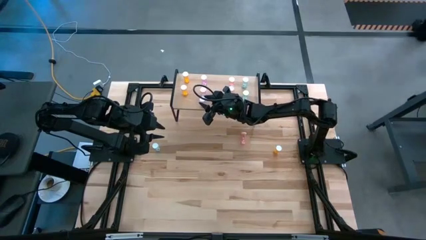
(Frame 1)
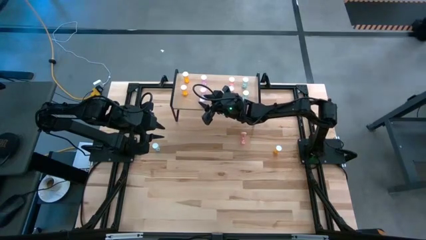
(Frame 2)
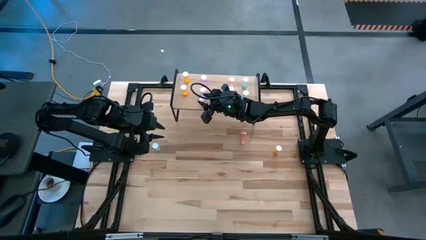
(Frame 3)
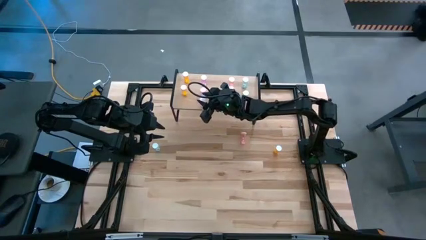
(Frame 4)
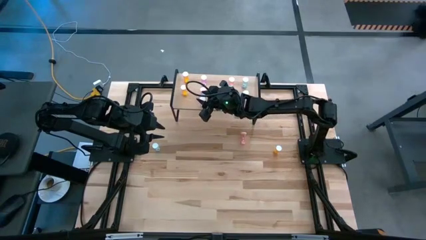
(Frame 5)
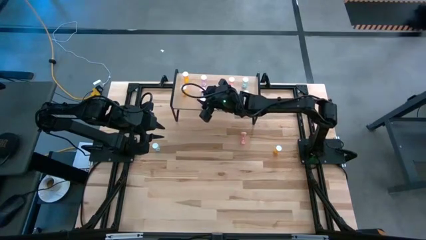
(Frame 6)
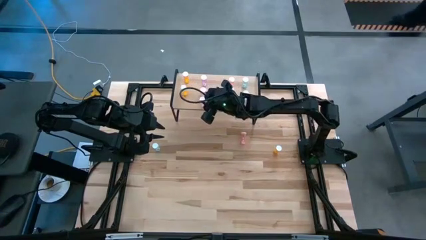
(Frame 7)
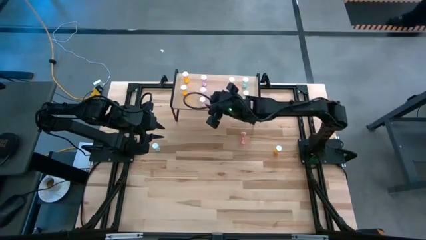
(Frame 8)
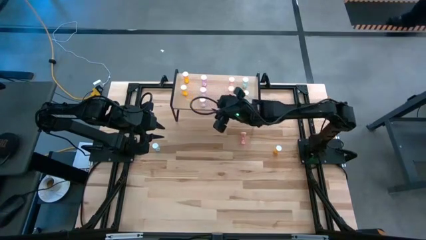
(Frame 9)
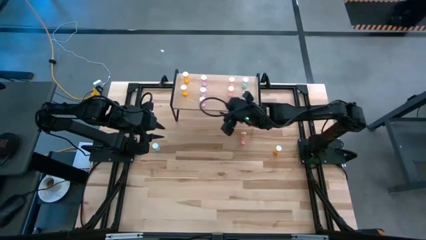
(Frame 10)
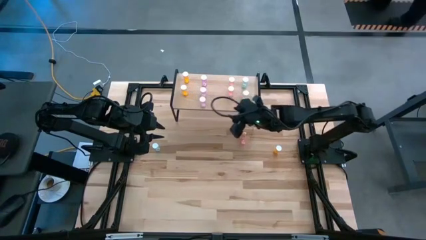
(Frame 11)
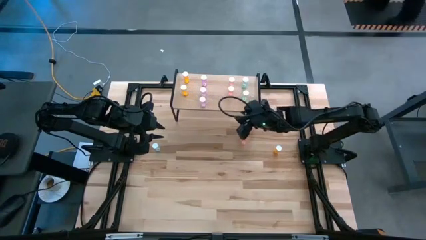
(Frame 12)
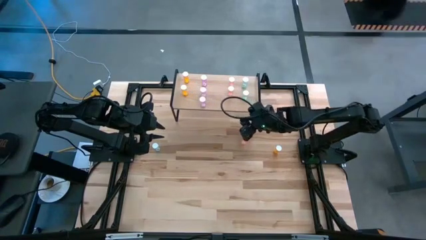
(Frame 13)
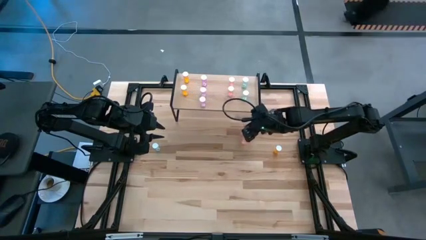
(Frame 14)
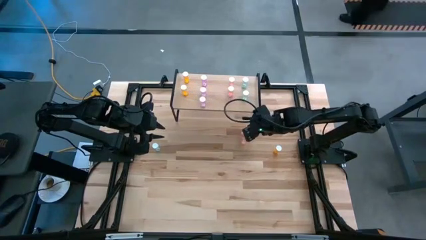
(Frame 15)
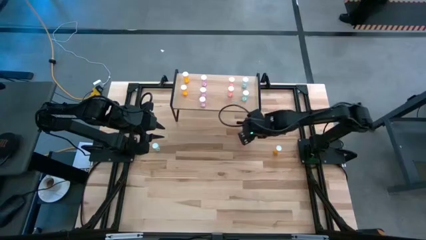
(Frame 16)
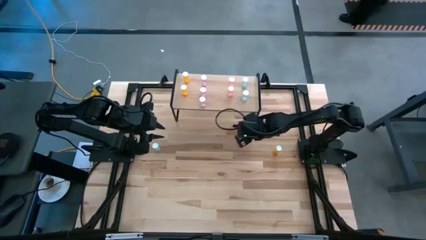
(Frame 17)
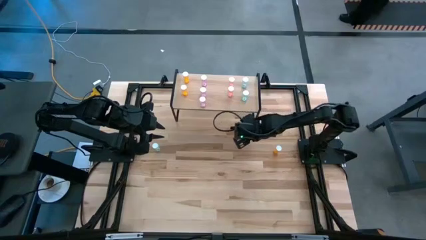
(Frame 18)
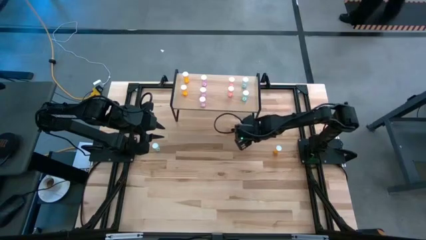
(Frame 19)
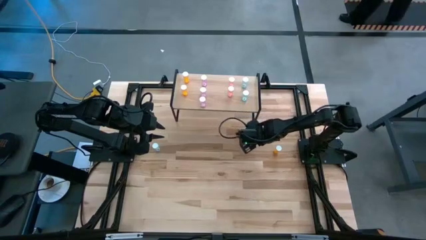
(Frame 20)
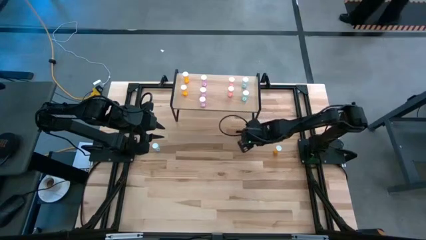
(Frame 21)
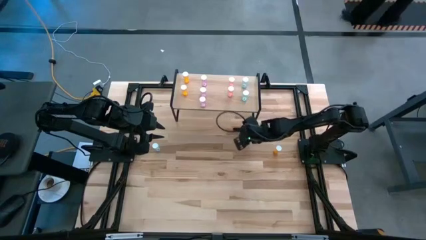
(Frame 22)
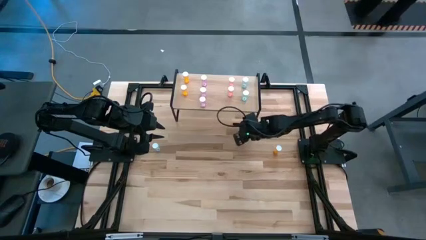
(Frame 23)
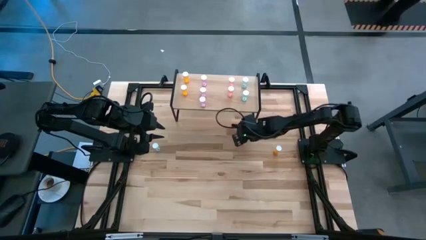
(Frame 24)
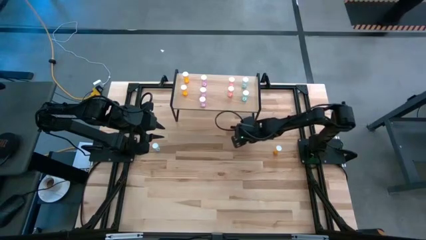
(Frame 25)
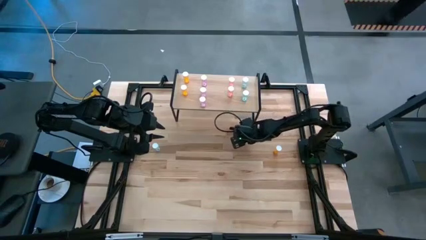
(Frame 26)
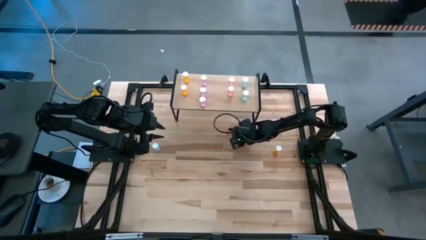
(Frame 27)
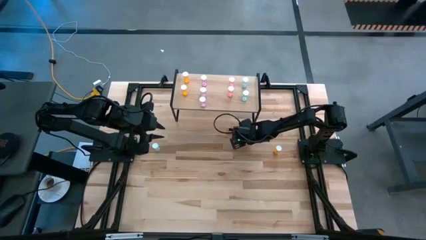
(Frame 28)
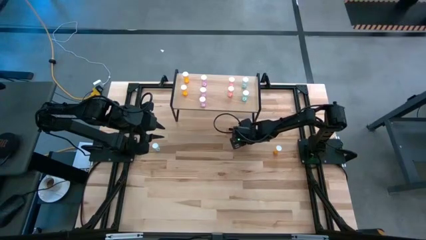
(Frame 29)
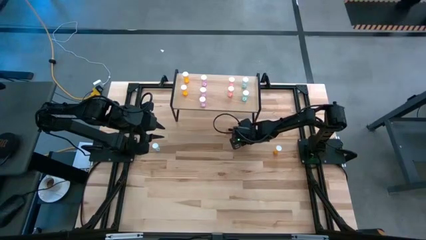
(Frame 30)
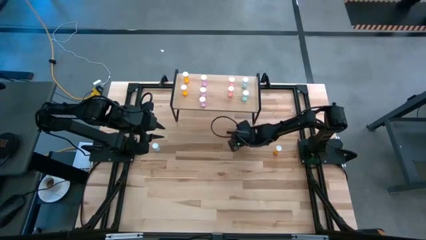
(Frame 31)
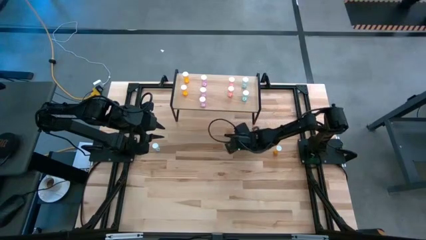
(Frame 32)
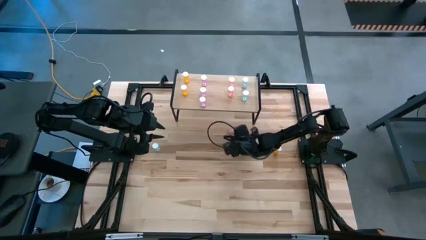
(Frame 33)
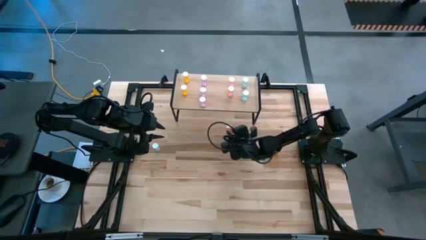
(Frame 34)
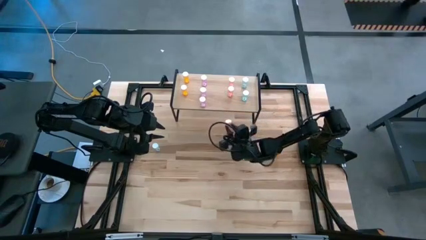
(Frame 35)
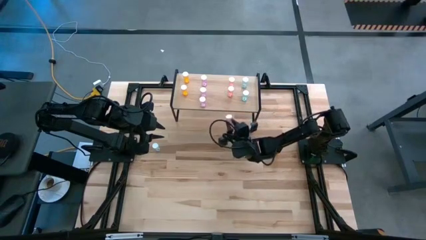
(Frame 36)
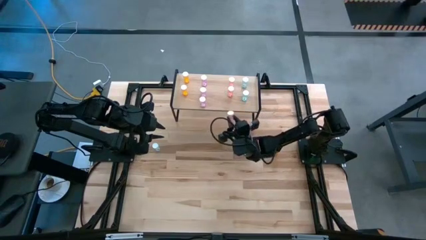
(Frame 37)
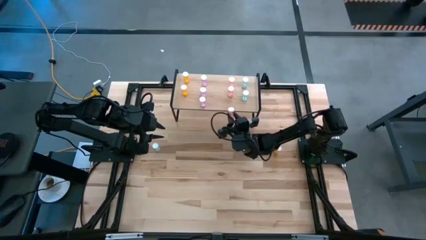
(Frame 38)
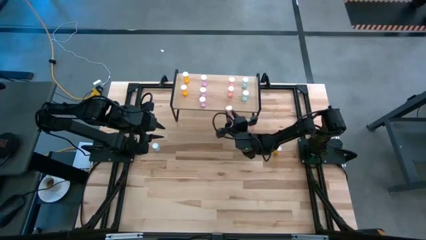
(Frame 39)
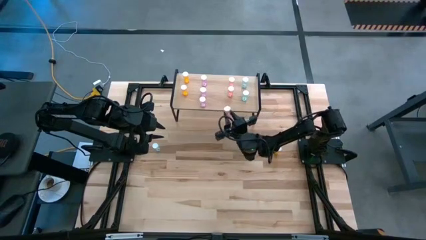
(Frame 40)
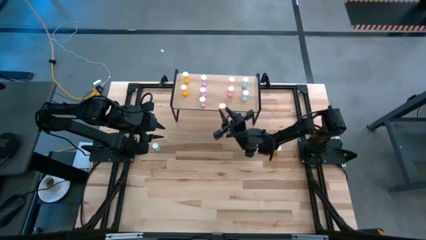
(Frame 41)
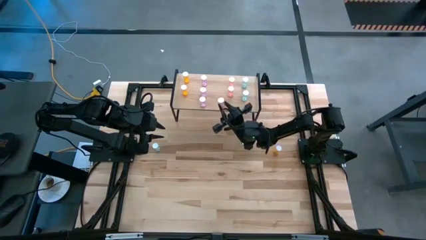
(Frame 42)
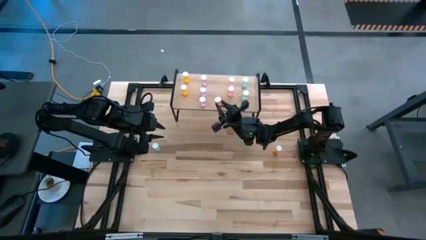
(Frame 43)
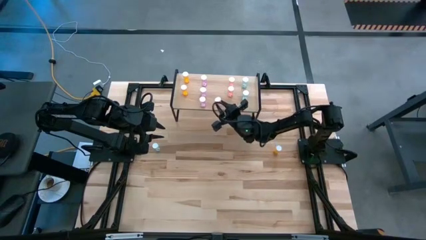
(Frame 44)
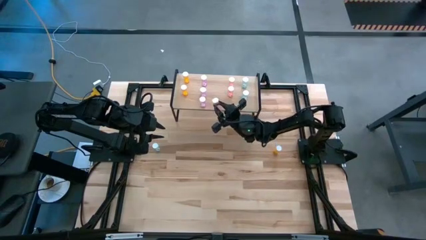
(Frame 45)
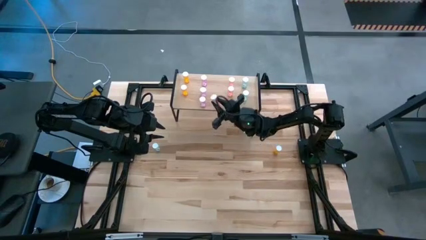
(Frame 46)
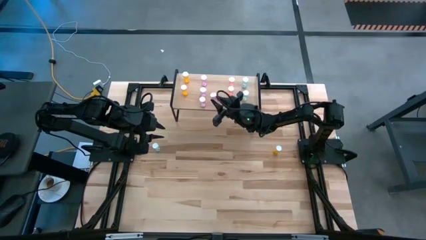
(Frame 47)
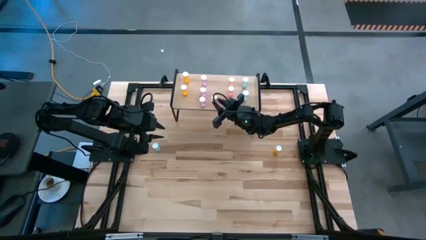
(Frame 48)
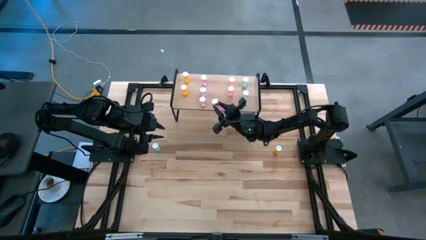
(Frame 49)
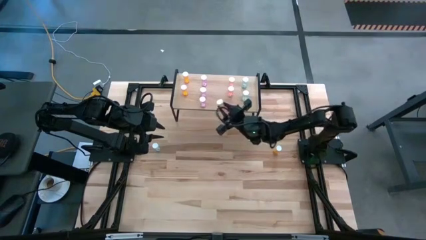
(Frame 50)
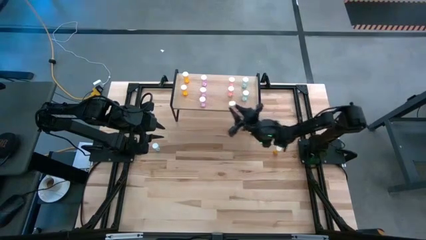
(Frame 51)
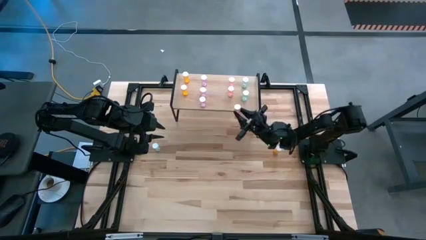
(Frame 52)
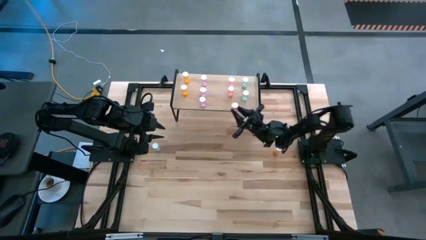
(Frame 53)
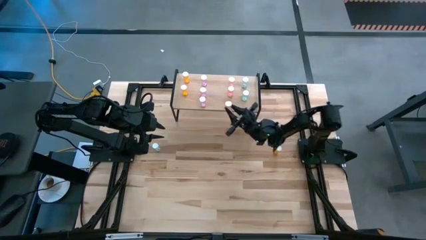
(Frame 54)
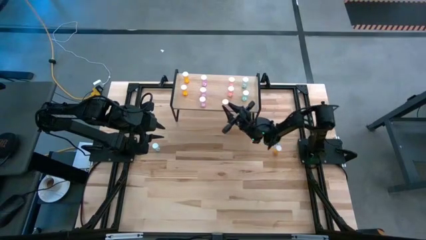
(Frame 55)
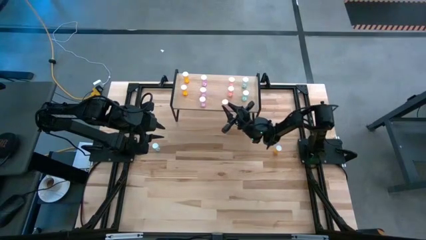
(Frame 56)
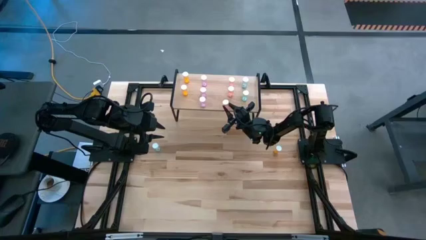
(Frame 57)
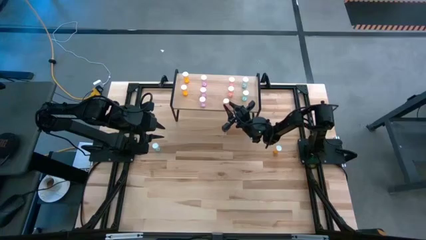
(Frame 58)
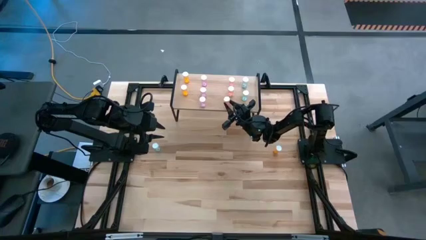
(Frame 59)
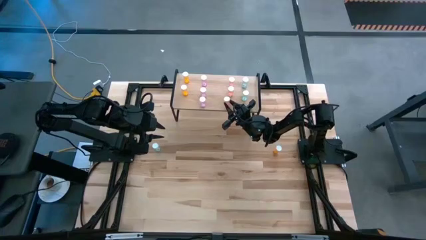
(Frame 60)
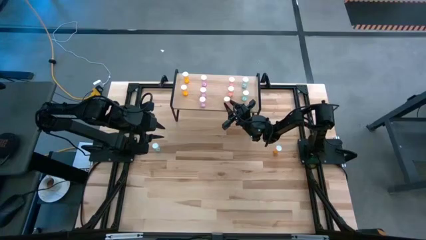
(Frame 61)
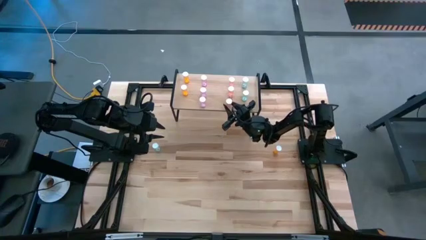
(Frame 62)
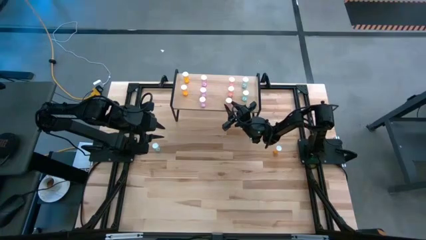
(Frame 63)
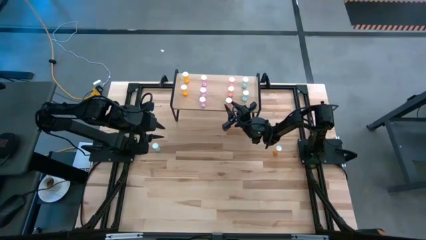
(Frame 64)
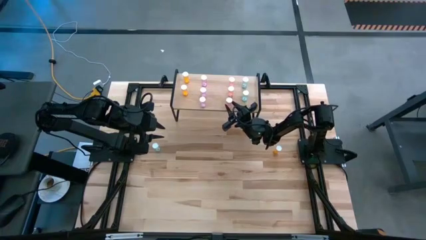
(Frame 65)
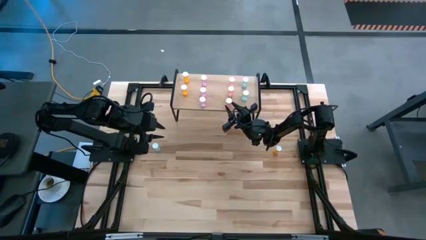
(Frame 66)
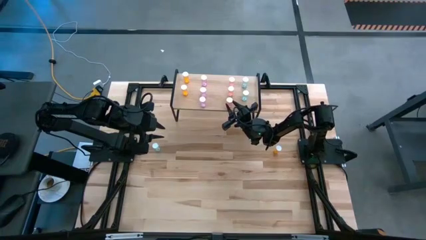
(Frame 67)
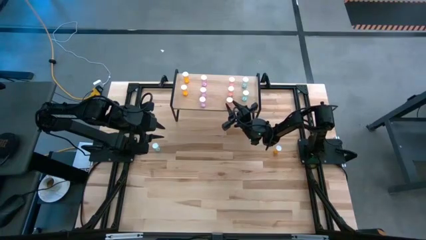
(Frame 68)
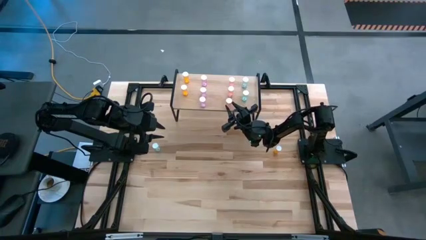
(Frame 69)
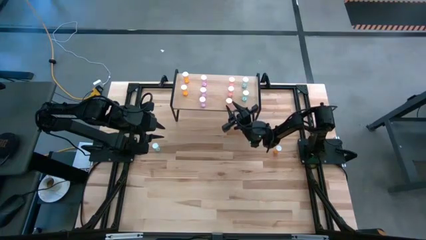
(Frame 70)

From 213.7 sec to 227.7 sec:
Task: Pick and place medicine bottles onto shelf by color
Put the pink pill bottle on the shelf aligned with the other pink pill bottles
